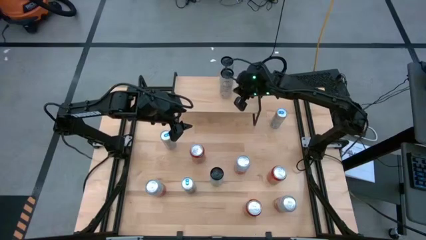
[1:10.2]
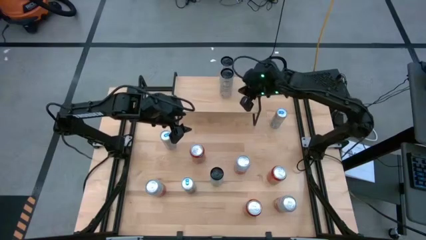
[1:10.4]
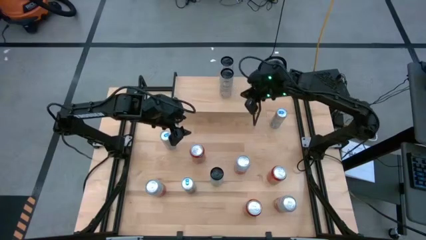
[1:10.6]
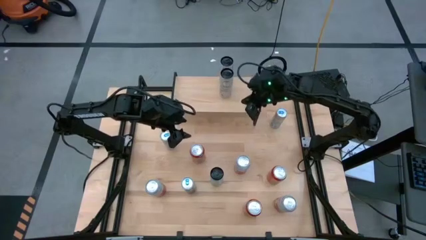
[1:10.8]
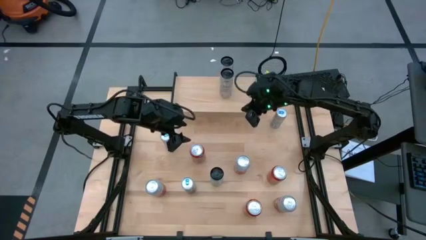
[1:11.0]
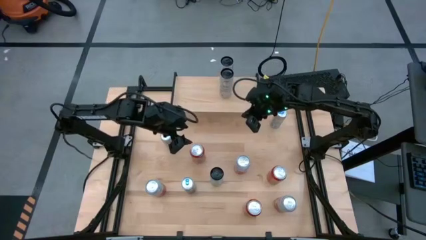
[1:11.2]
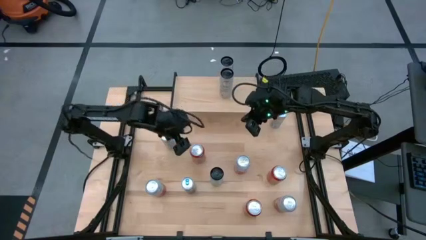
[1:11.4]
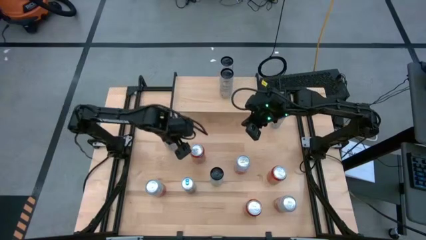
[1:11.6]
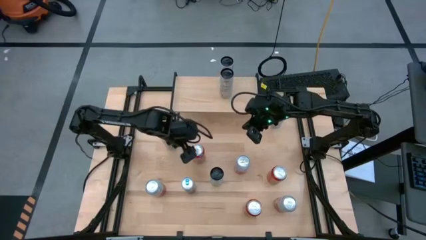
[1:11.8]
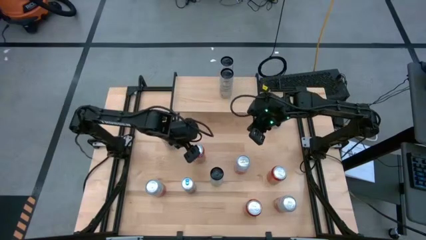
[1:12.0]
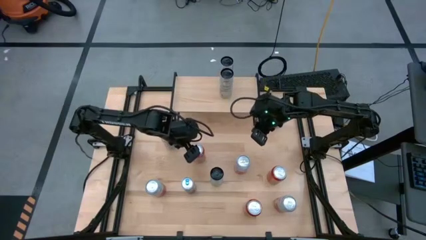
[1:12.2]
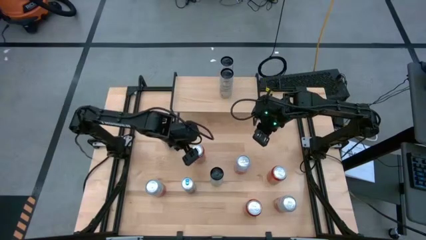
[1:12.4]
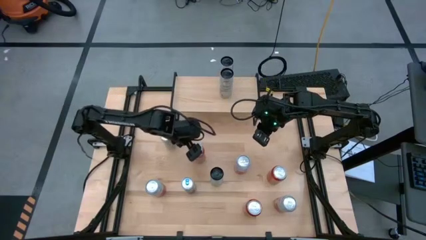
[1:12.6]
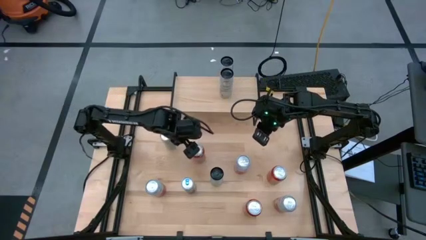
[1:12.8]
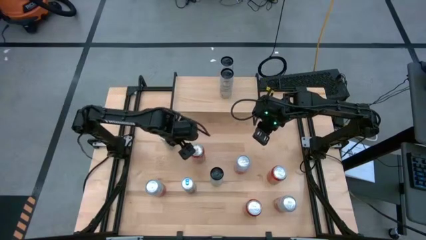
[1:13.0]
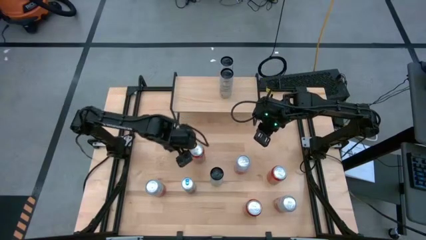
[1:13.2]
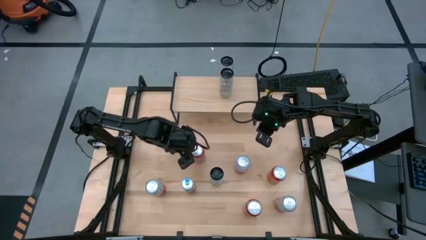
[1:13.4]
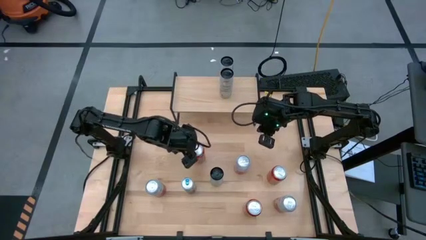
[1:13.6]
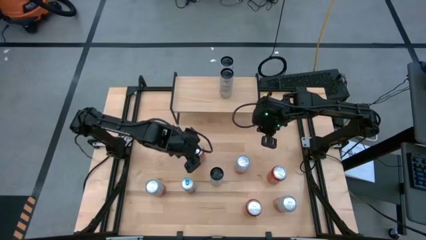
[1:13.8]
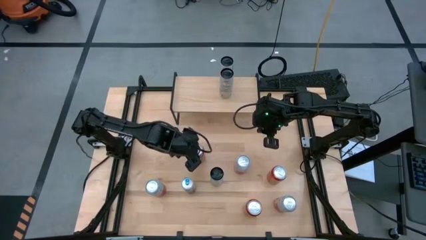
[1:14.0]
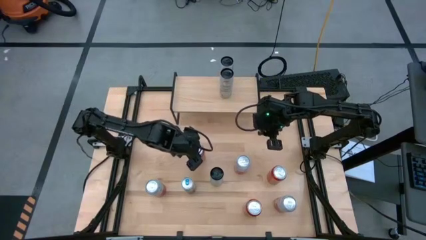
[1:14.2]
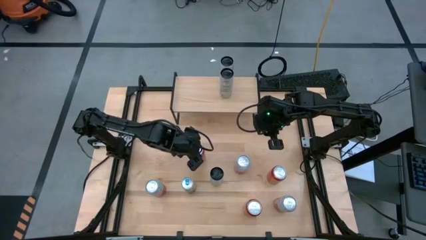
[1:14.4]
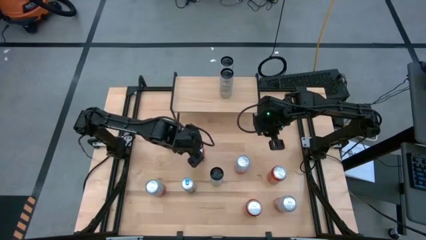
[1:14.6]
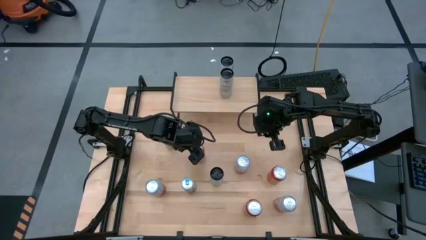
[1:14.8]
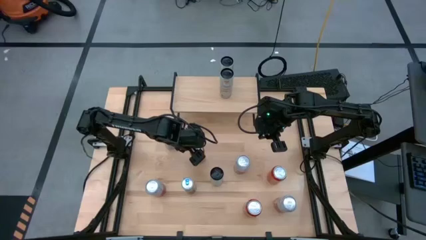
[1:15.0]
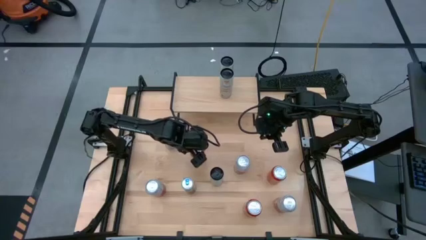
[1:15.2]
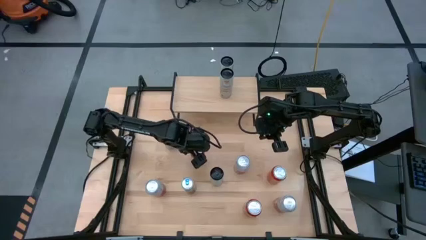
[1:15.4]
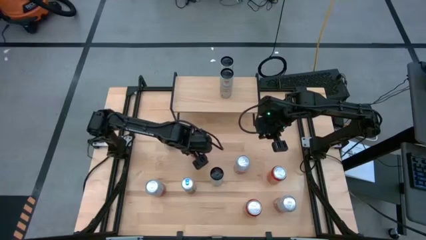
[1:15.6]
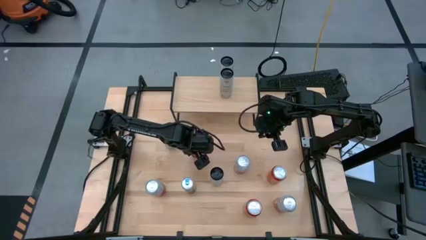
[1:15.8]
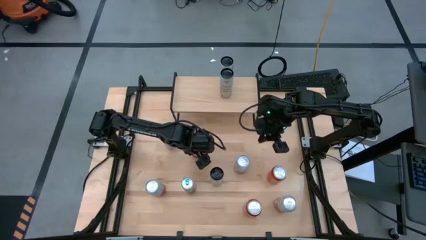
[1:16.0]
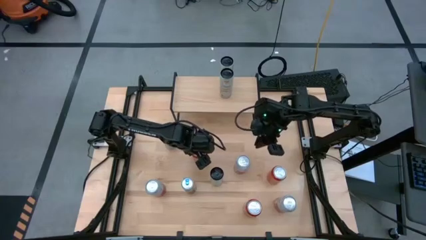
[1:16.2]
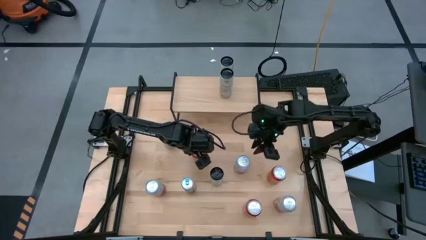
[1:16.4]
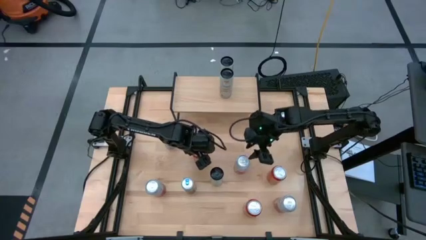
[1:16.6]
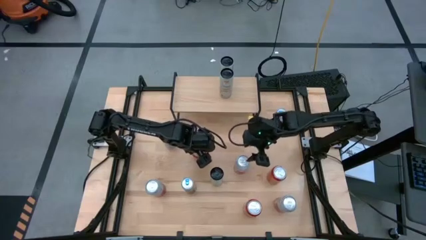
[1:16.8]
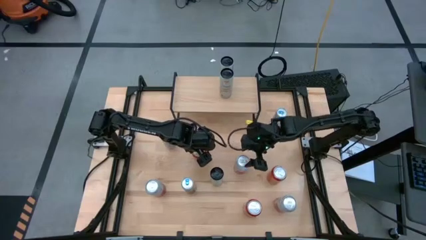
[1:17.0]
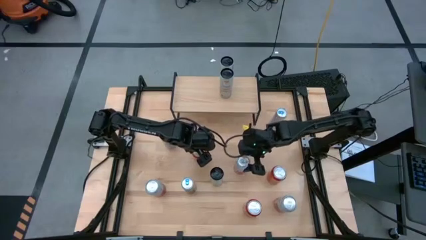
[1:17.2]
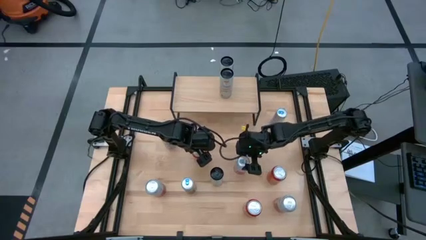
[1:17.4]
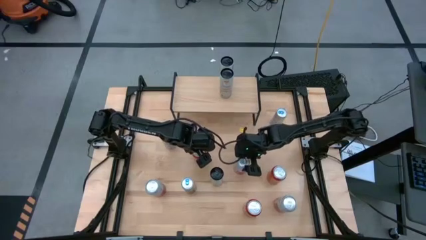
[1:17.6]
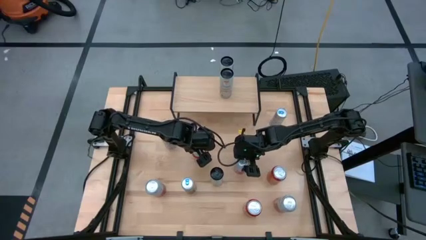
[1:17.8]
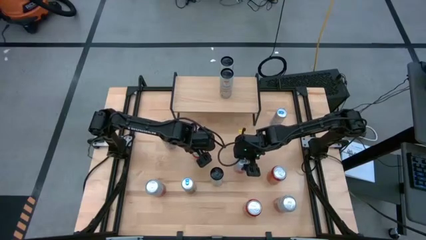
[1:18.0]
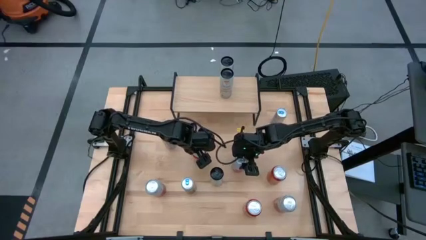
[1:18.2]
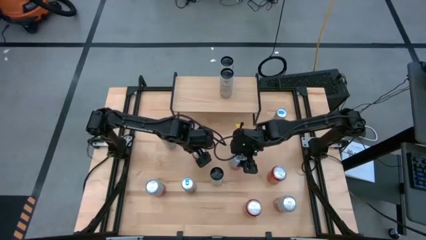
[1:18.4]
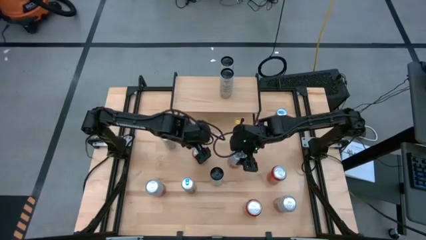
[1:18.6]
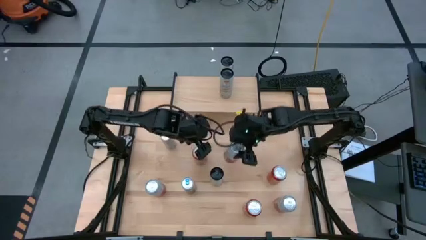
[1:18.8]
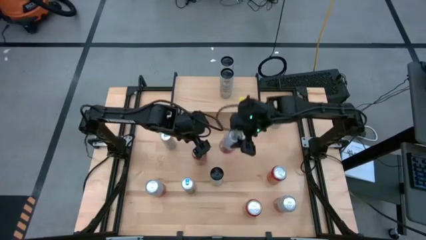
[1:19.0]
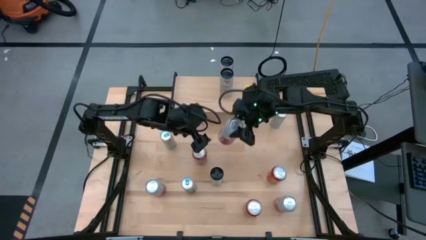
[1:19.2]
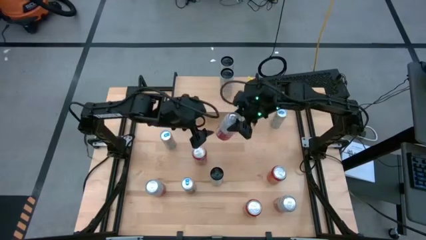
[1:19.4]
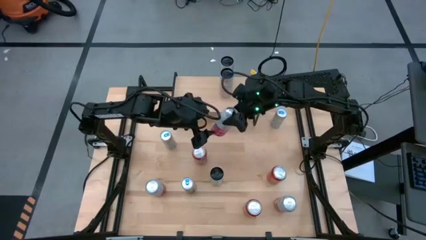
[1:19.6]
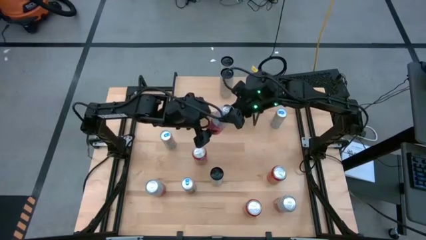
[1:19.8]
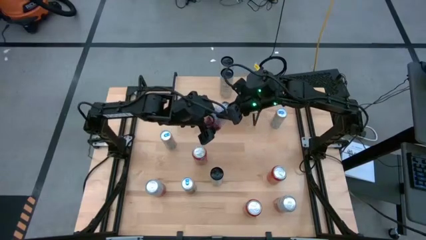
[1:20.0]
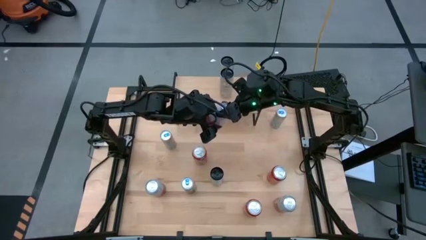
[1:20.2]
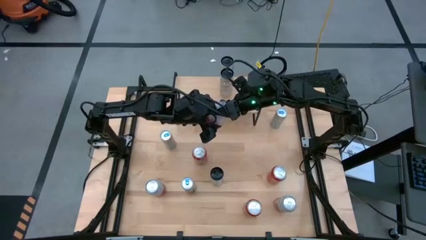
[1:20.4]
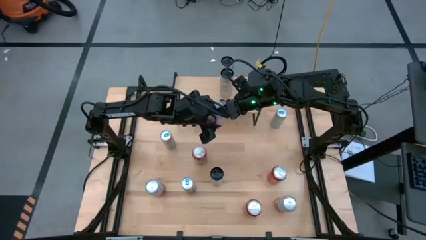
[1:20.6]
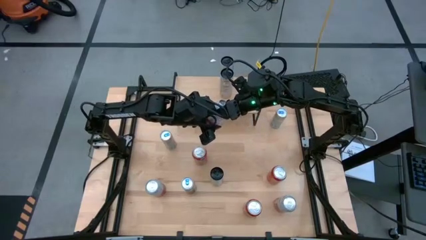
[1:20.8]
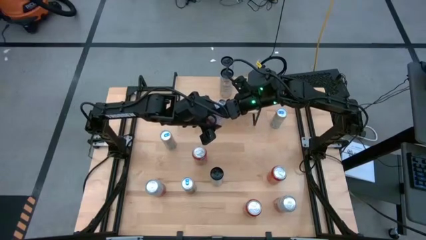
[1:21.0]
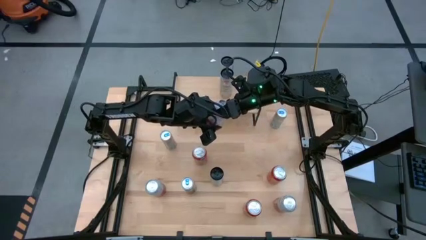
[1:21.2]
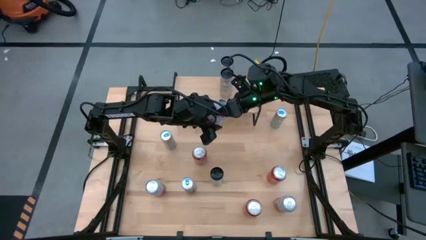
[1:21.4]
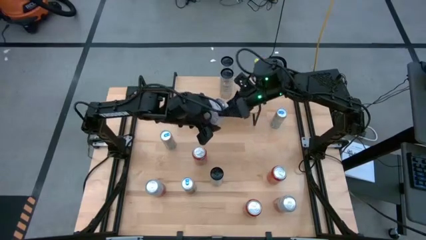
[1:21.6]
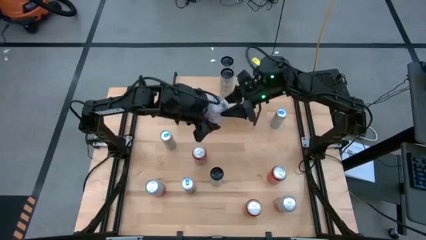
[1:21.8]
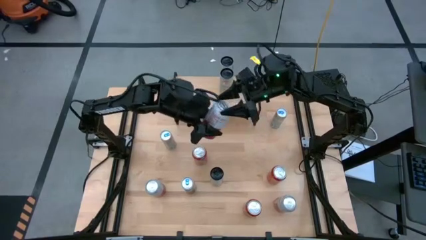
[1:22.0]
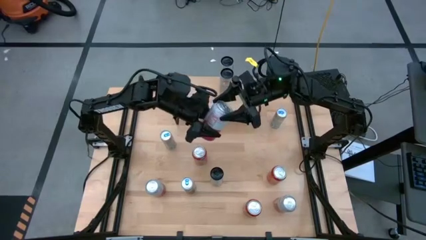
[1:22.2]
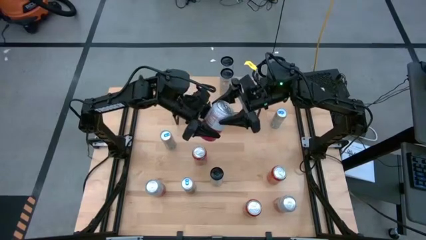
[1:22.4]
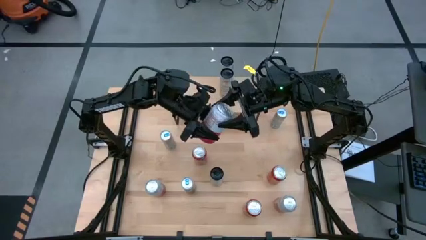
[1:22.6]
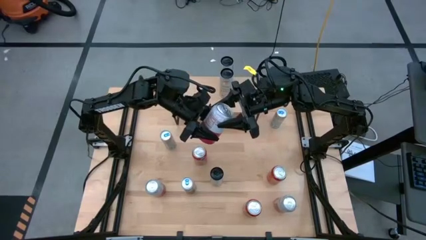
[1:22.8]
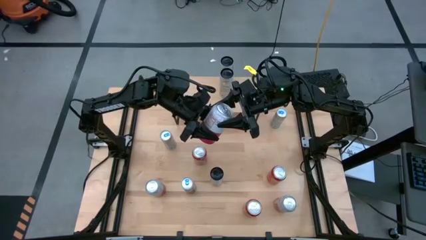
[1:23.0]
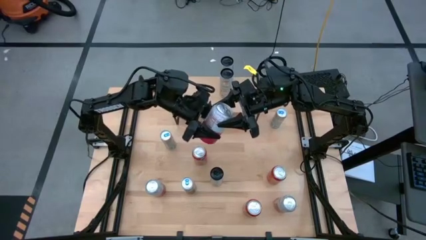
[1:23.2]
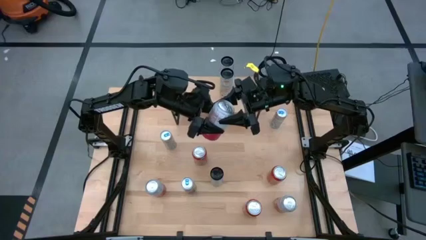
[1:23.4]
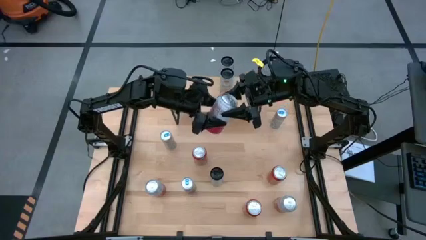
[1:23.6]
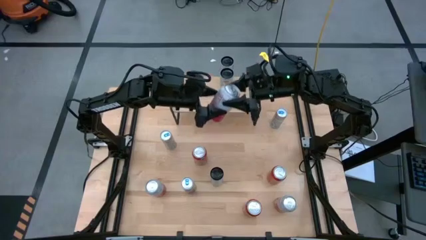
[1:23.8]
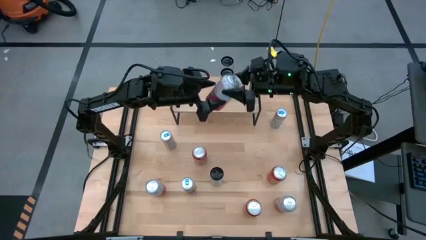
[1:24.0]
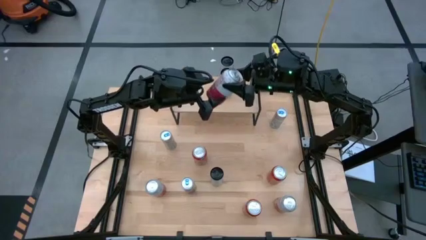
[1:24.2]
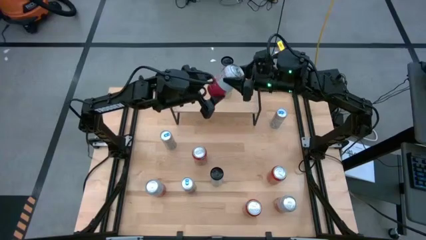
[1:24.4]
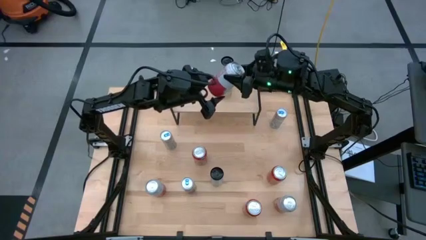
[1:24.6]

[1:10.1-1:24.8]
Task: Place canned beverage on shelf
Put the middle pink-white soda can on the shelf
